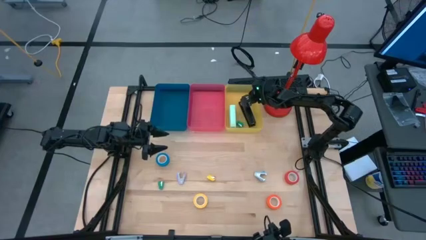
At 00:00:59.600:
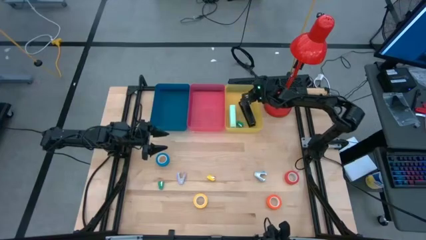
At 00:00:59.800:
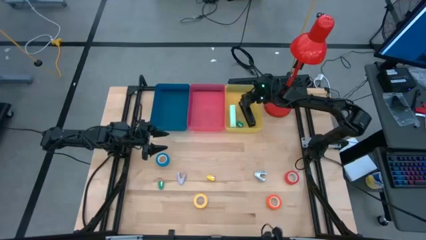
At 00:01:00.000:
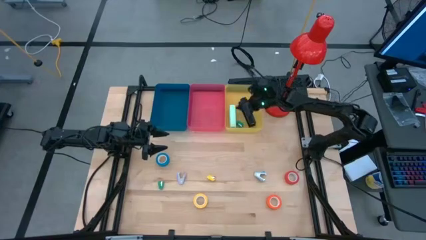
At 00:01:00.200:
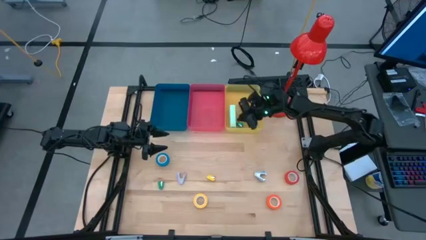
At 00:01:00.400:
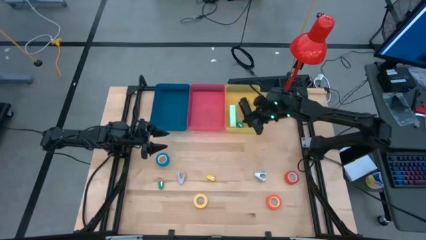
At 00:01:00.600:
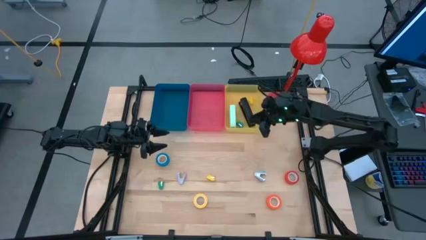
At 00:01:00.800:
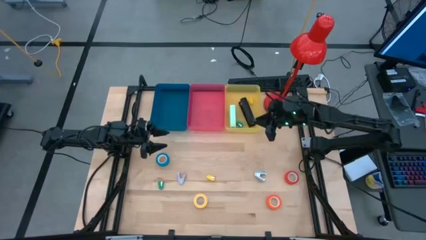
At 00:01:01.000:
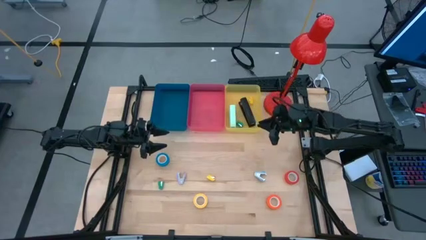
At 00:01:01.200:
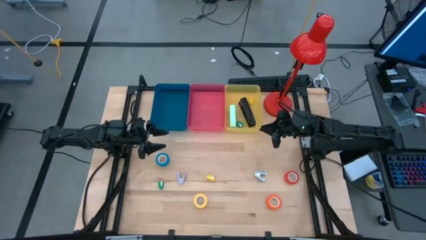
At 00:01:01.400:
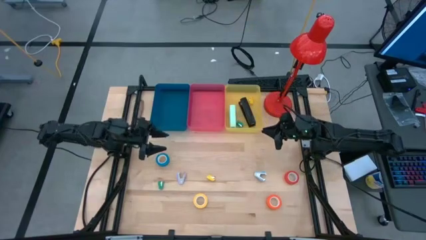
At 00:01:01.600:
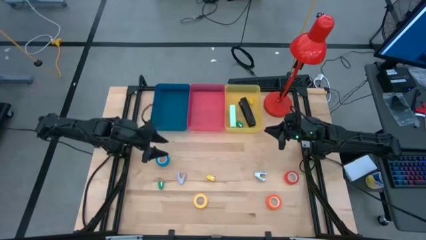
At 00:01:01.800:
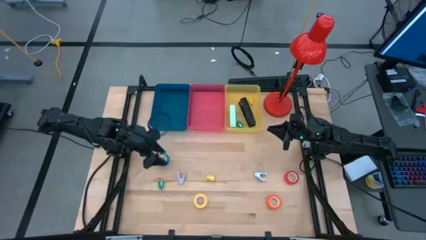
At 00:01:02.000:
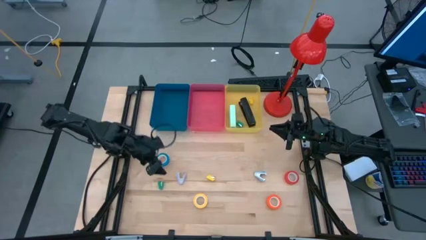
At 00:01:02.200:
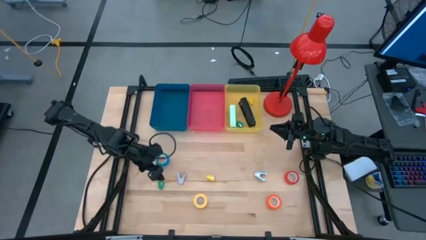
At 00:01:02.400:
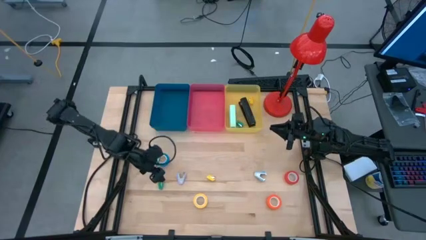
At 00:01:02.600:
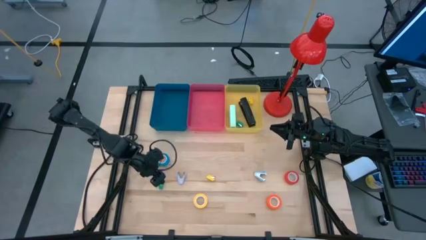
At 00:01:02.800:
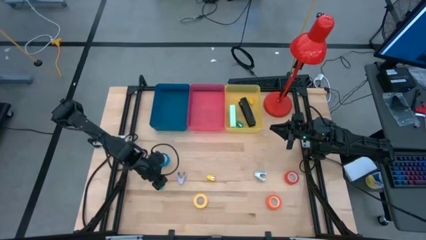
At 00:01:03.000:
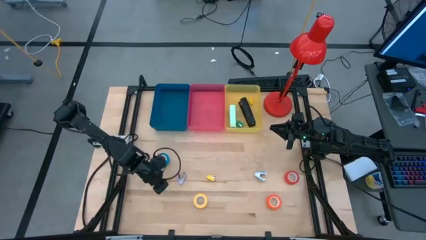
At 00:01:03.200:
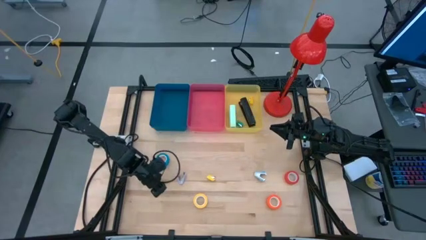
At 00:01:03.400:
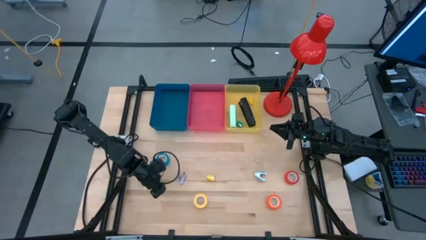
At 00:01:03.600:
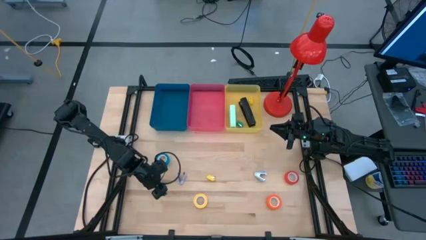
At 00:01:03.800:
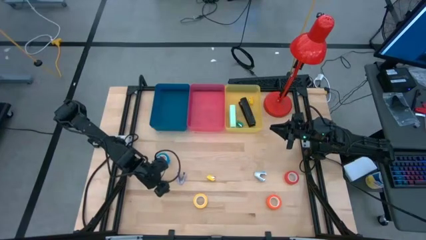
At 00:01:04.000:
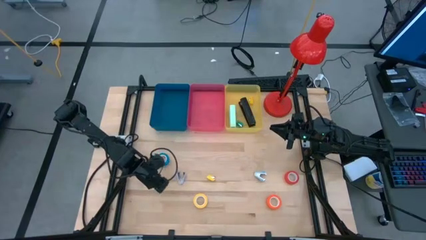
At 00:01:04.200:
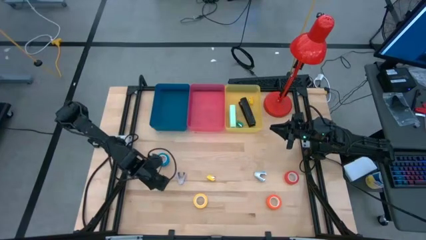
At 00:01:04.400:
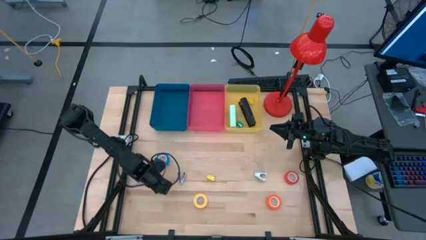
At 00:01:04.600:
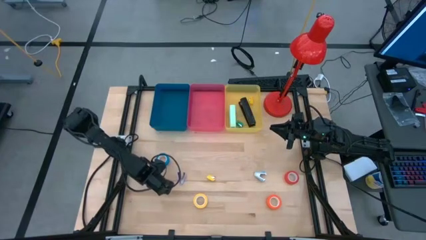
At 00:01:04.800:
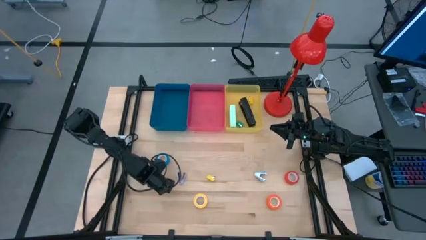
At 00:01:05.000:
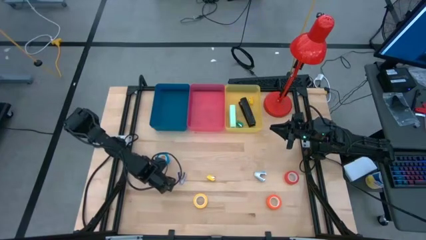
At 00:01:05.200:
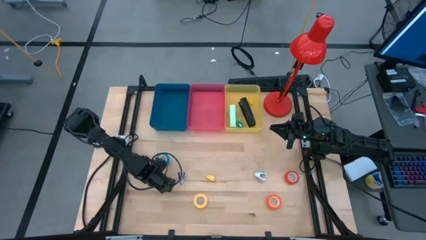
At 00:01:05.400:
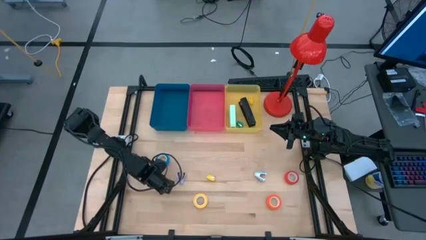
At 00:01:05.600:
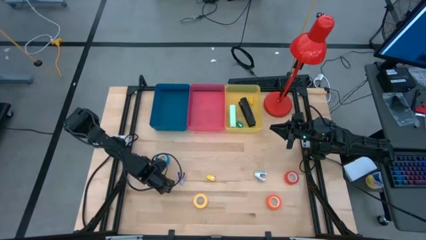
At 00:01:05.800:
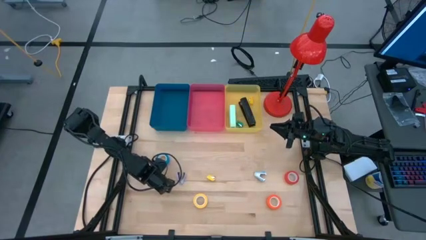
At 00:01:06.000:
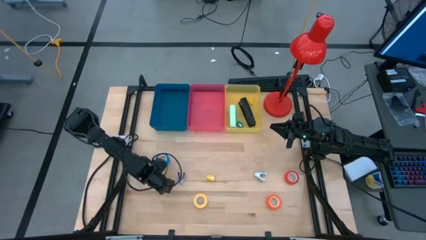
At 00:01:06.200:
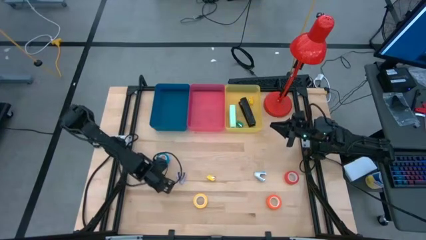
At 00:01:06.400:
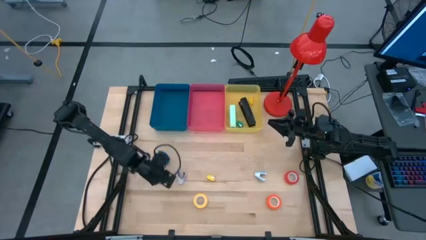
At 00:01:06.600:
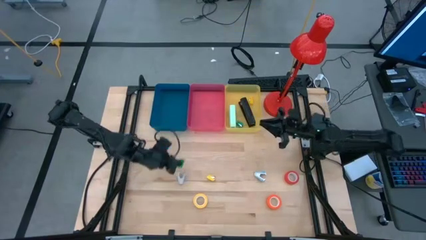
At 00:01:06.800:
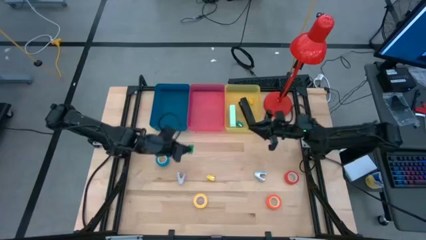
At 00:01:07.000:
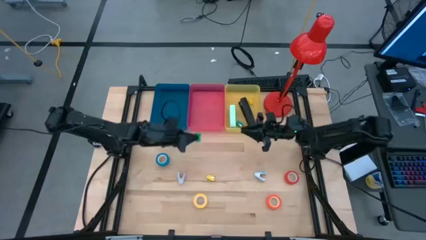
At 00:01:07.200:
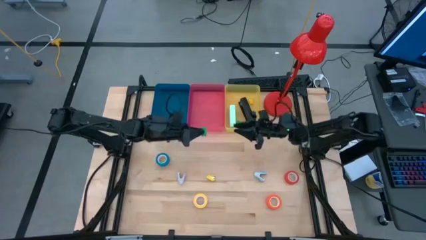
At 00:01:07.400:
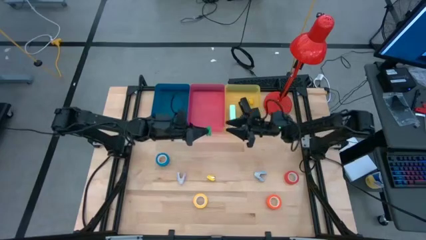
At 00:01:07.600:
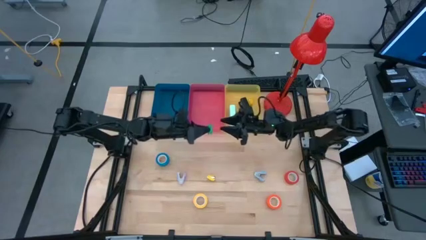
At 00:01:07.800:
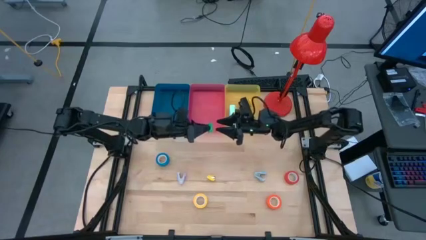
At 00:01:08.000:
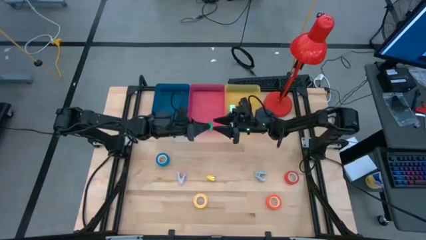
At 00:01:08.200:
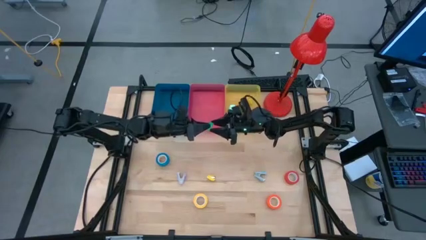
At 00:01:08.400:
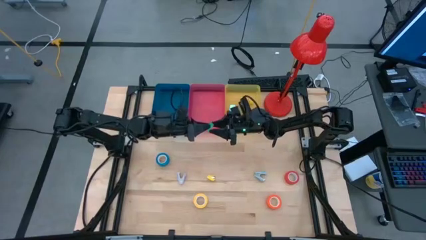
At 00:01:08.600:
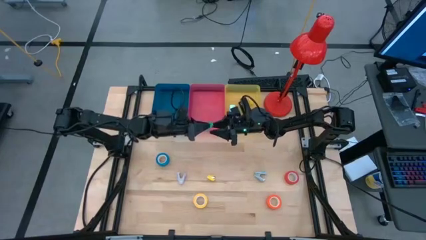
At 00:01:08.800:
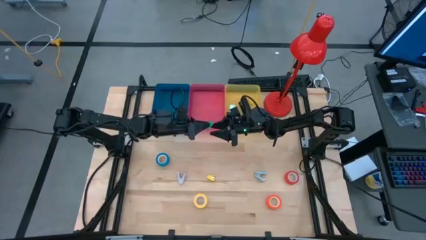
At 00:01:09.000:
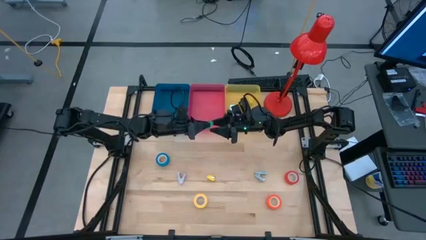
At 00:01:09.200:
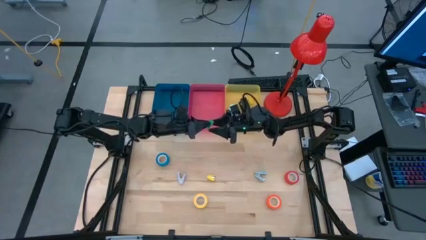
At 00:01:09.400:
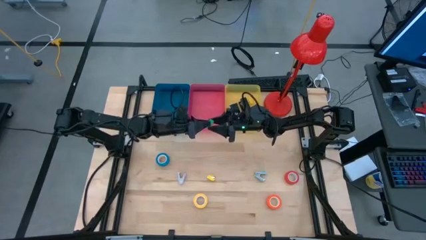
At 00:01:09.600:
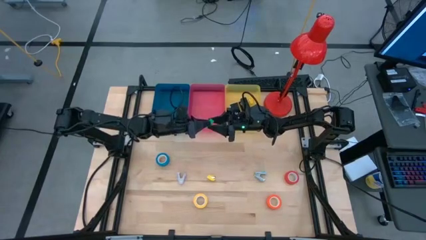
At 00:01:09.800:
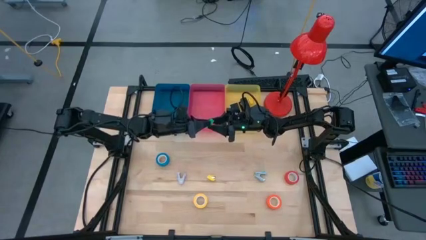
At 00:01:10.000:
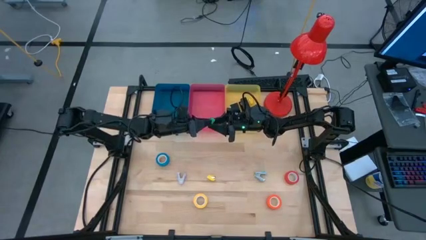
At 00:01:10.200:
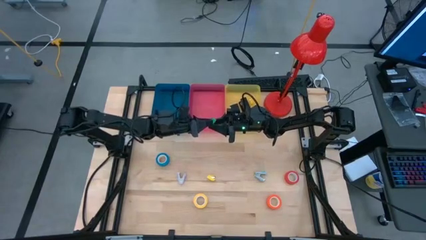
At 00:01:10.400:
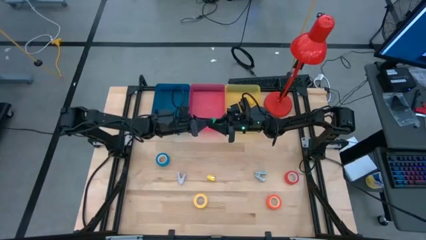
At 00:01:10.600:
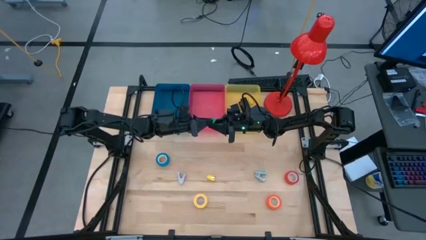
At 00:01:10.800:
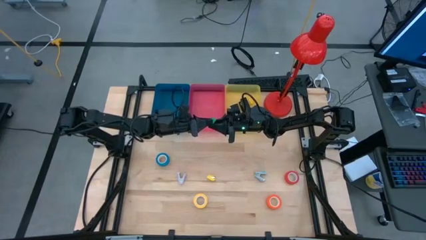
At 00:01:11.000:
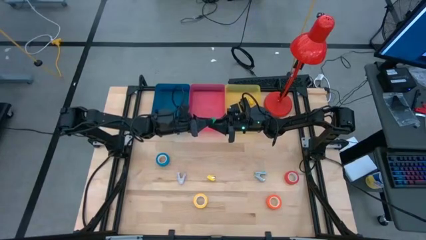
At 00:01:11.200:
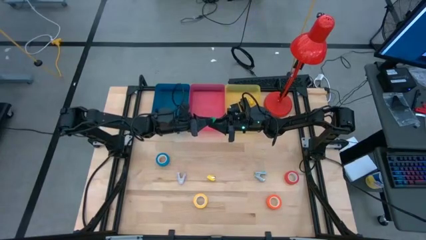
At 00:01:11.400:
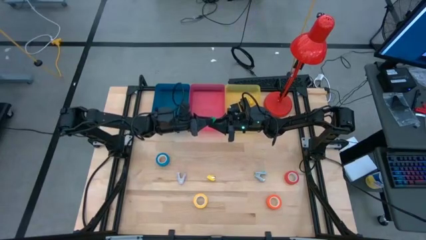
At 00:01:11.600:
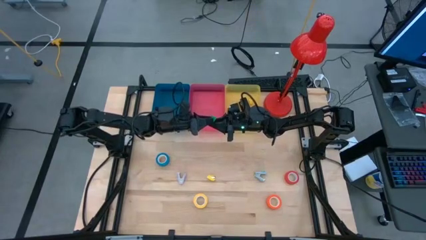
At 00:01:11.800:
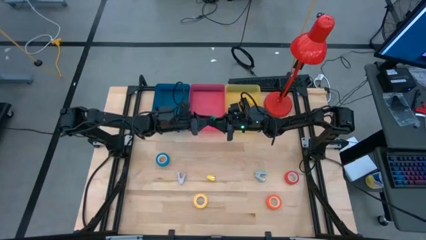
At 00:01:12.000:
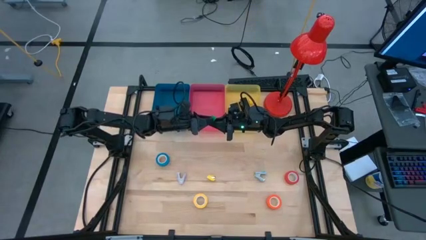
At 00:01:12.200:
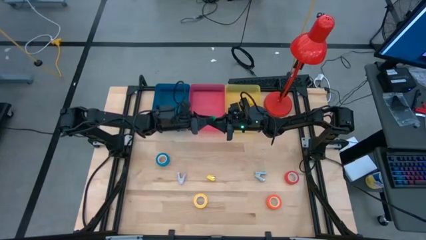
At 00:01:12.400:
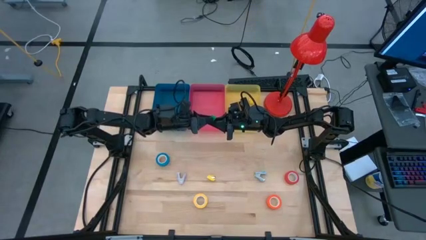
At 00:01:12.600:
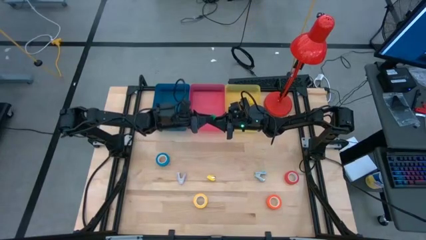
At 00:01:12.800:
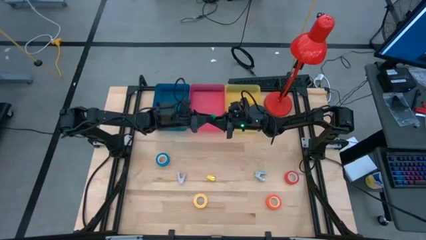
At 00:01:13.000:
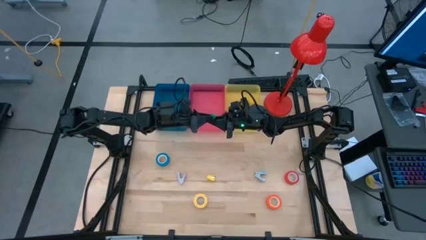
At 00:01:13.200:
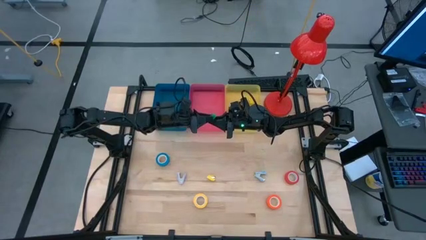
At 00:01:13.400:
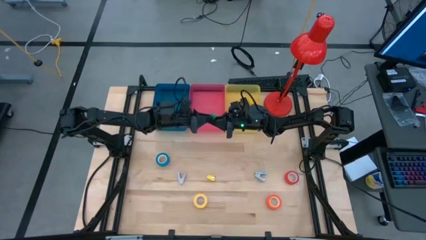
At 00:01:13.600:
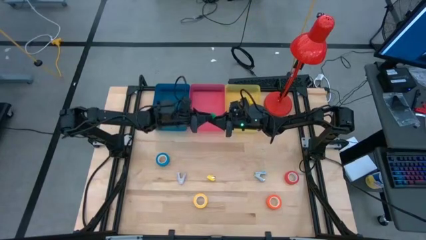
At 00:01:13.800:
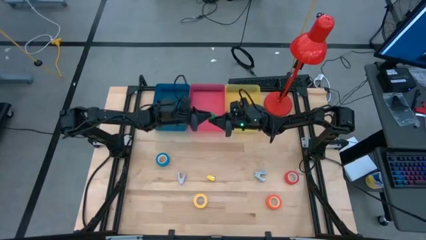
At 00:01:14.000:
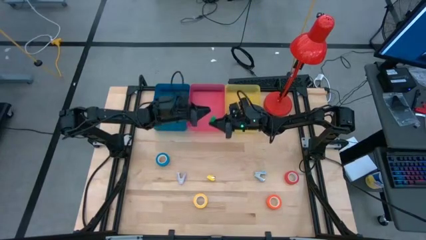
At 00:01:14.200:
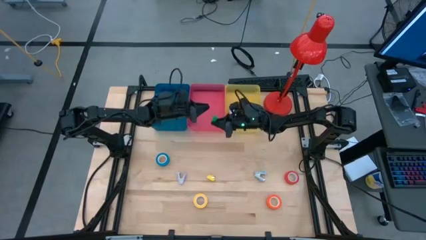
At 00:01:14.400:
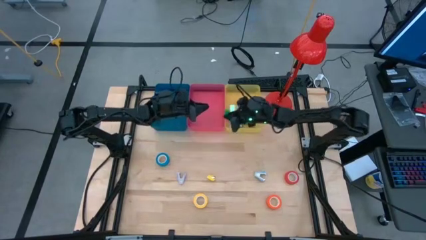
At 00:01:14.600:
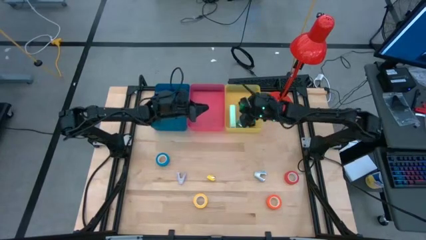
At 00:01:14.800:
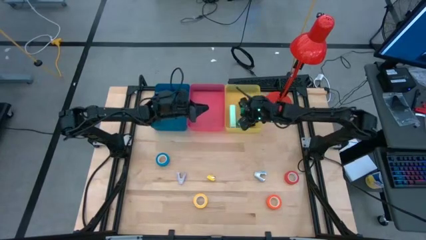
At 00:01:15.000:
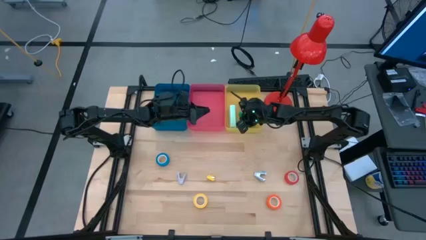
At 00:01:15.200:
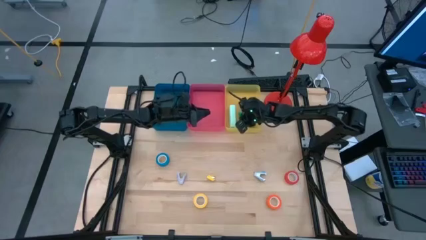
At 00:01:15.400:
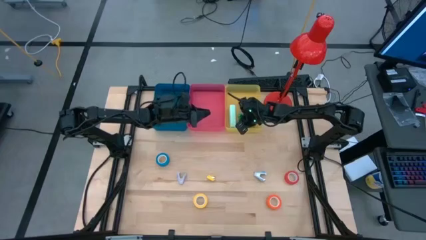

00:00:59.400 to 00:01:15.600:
Task: Pick and place Stapler, Stapler remover, tape
Put the small green stapler into the yellow bin
